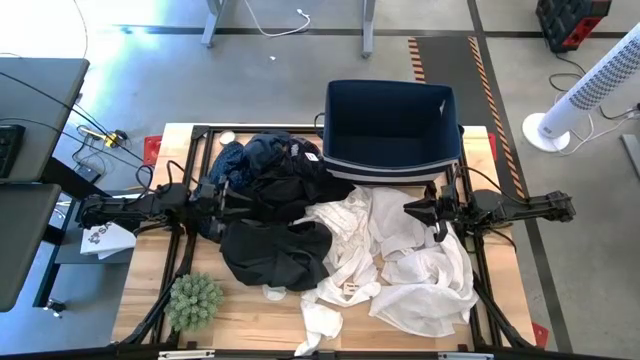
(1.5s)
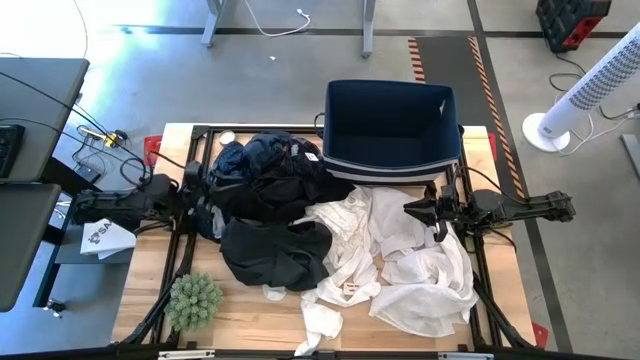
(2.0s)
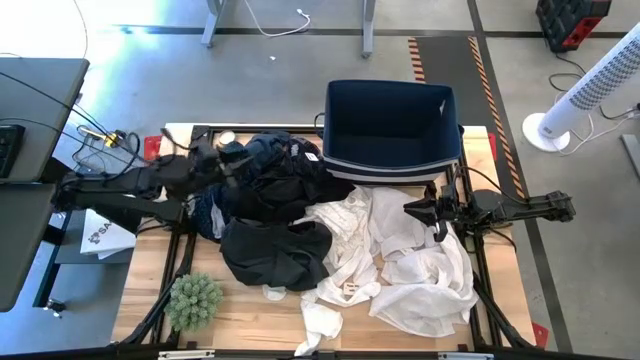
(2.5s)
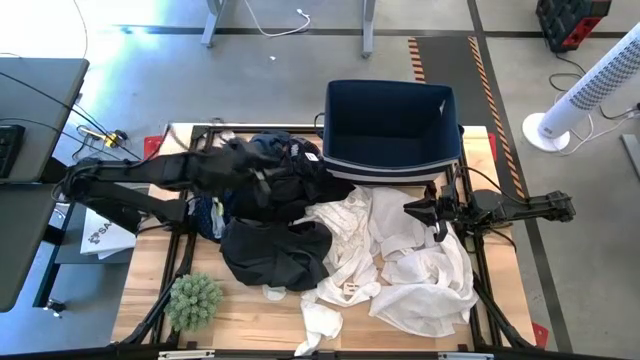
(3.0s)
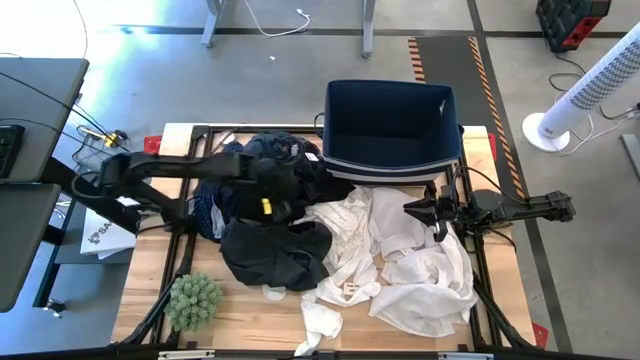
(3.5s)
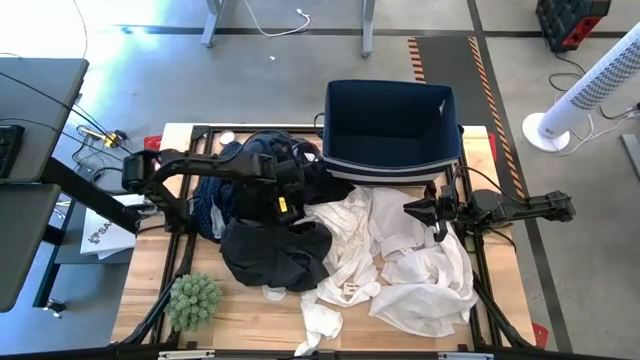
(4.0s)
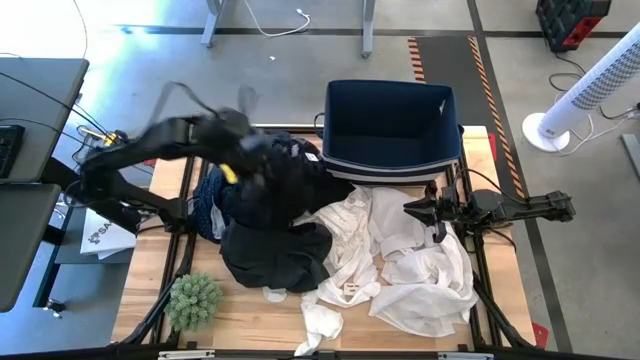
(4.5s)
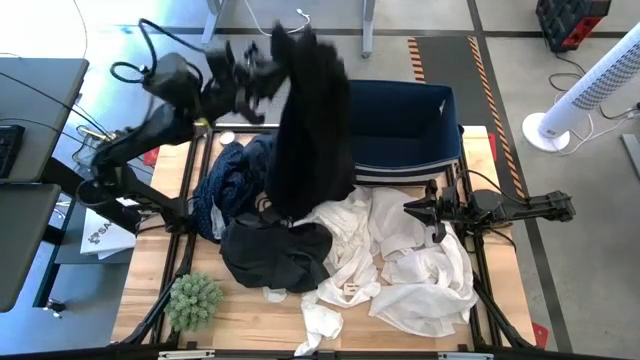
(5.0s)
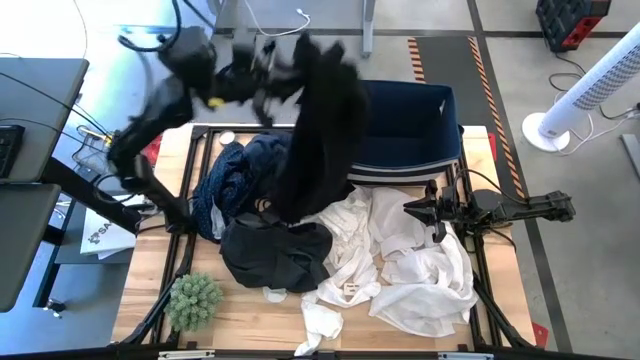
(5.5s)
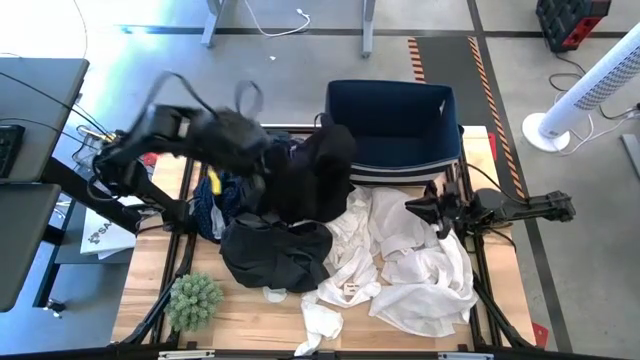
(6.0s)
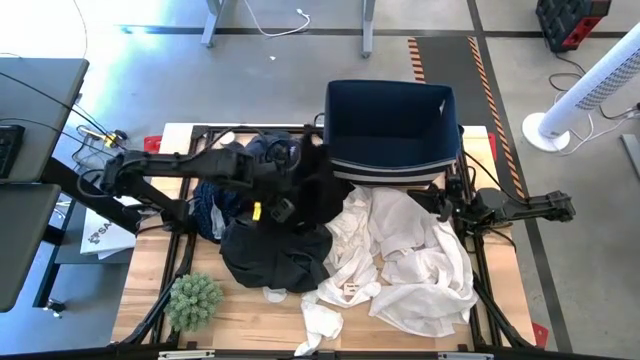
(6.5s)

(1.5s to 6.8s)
Task: Sort clothes
Put the black shirt into the blue laundry organizer

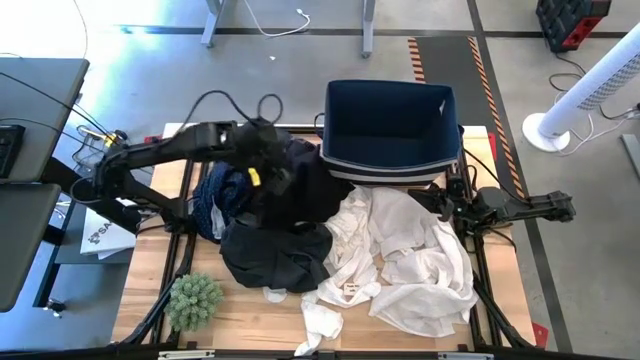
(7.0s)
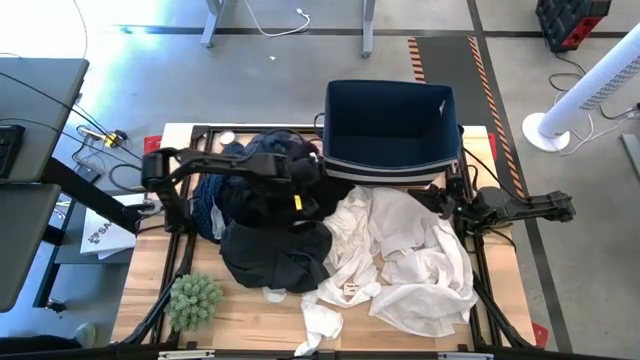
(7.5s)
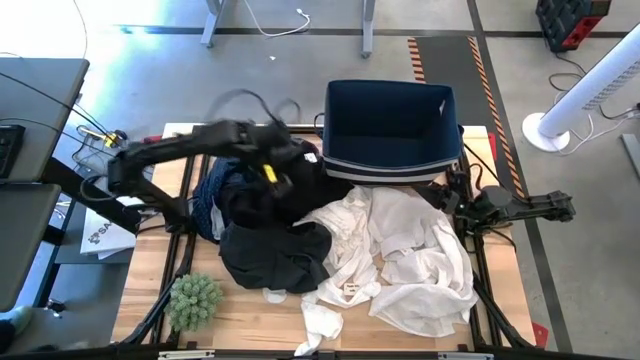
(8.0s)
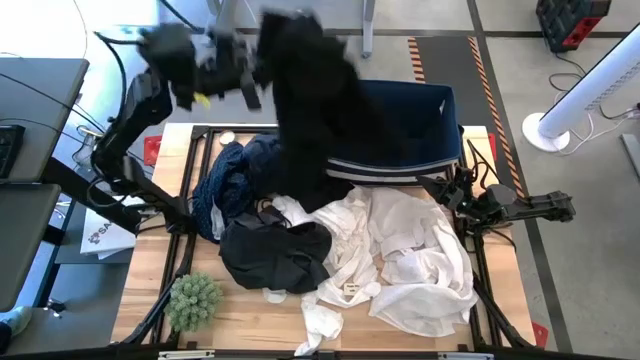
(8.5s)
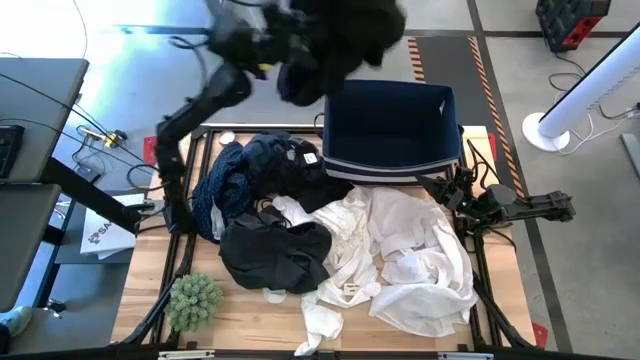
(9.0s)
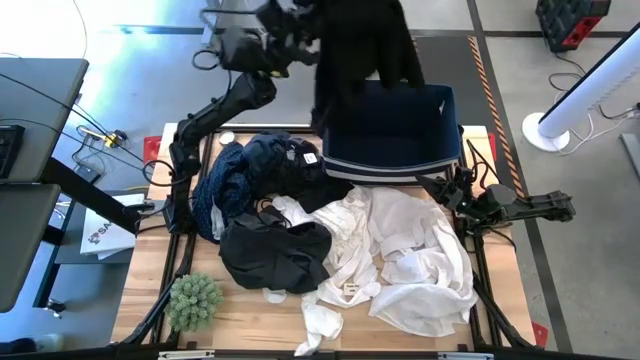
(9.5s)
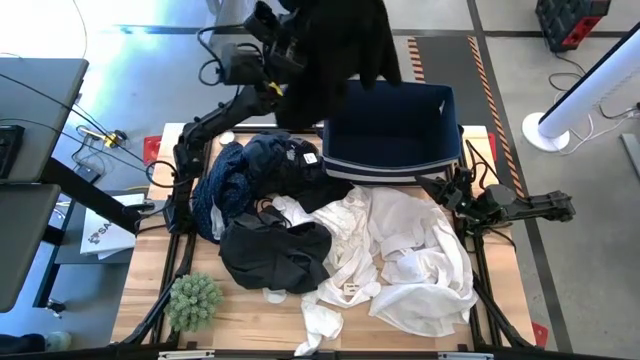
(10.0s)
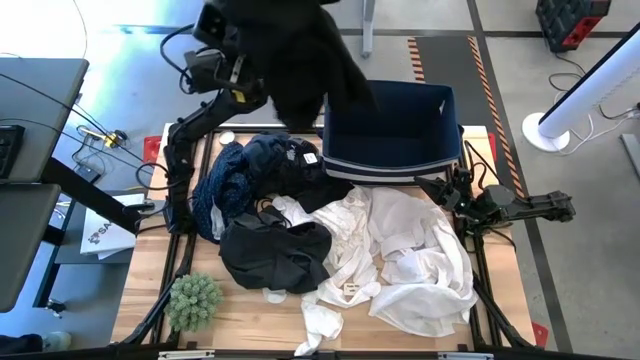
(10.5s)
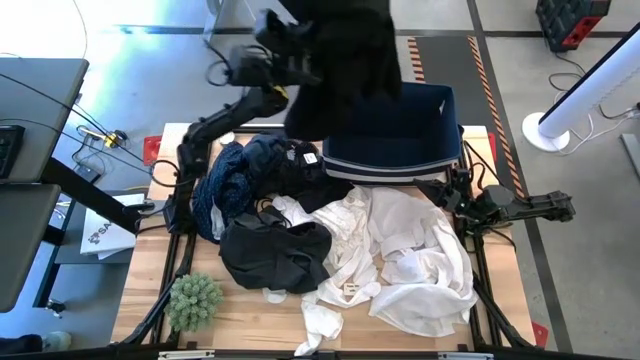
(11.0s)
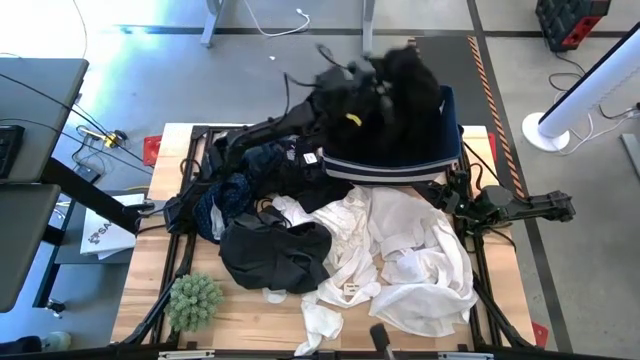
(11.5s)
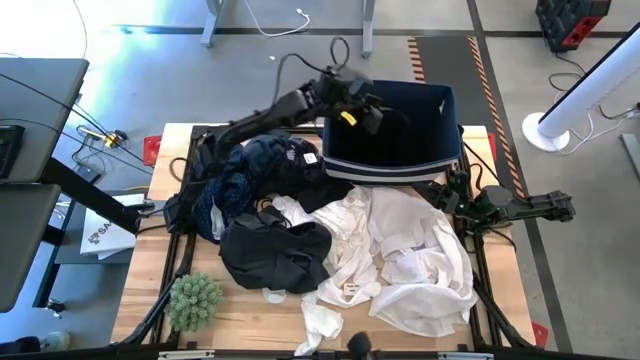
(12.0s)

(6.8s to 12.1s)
Put the black shirt into the blue laundry organizer

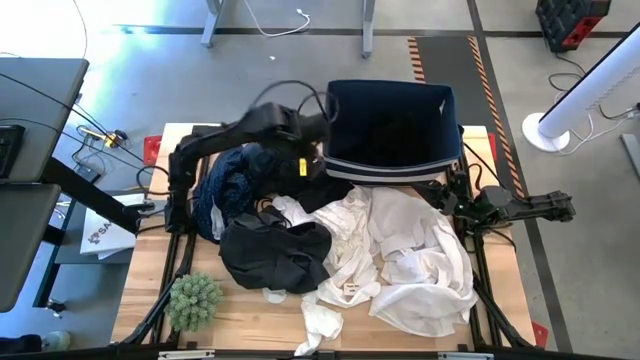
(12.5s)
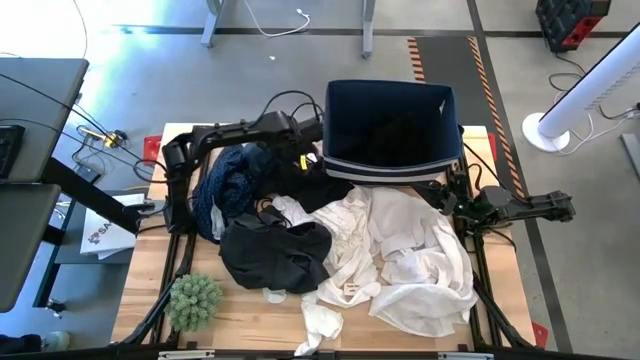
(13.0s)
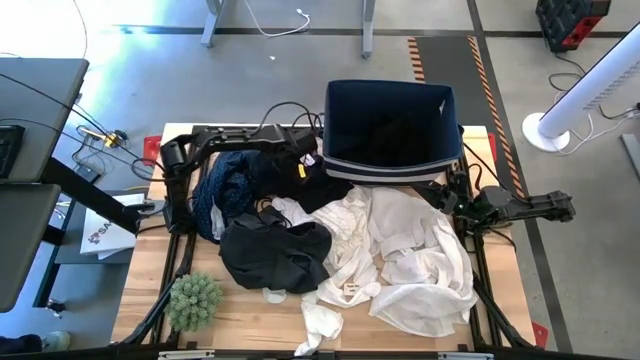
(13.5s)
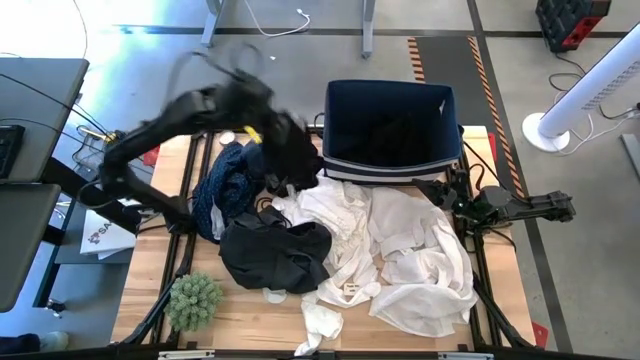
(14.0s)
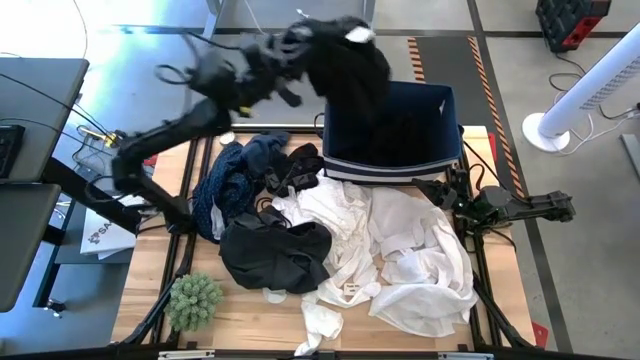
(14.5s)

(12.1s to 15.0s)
Put the black boxer into the blue laundry organizer

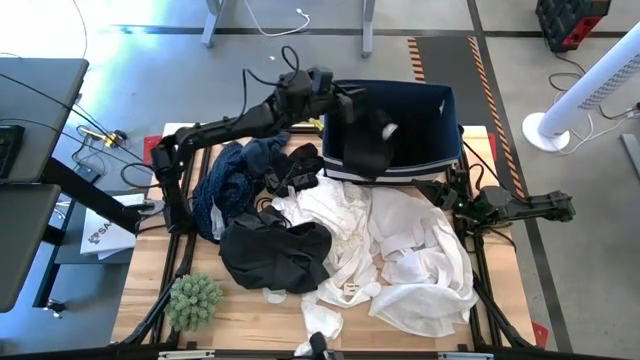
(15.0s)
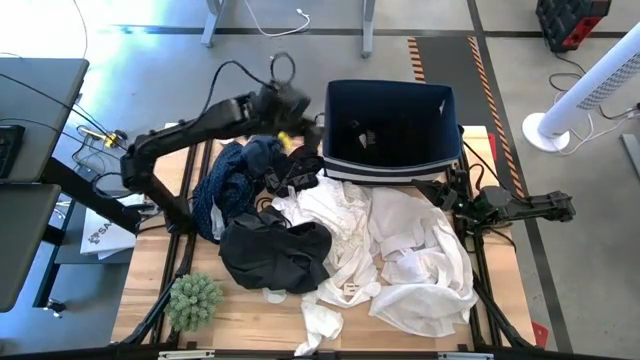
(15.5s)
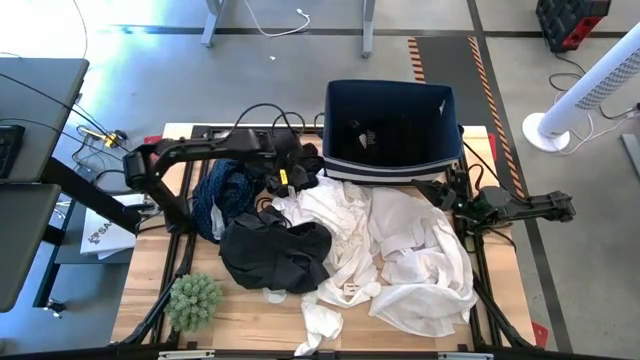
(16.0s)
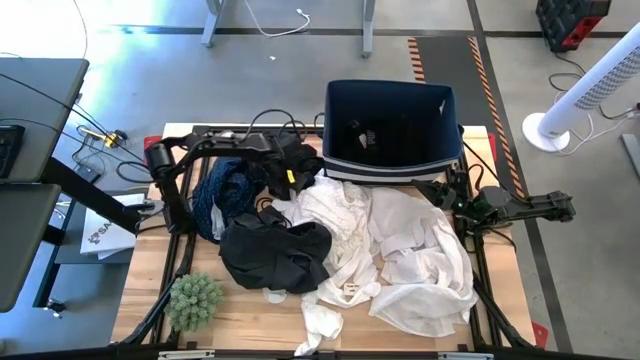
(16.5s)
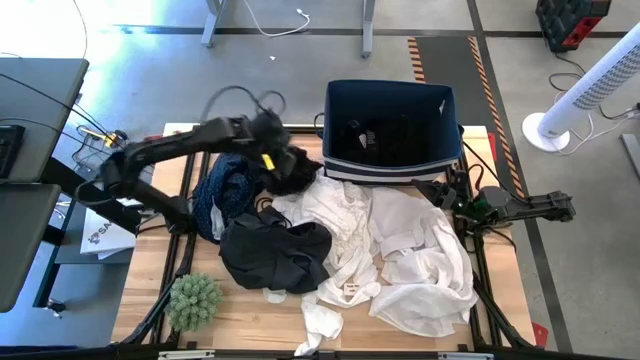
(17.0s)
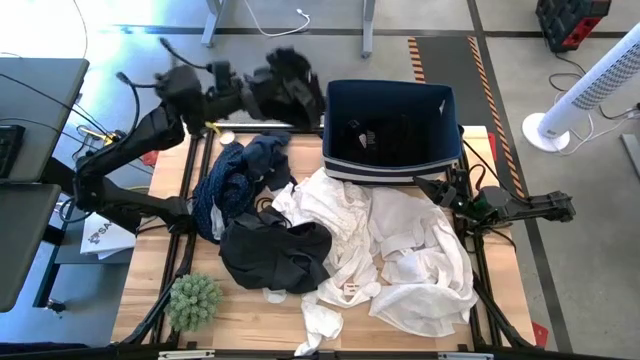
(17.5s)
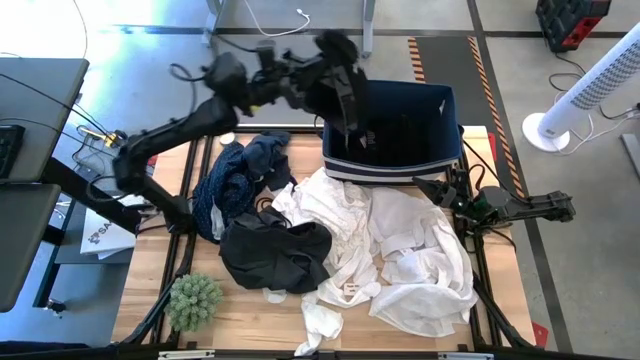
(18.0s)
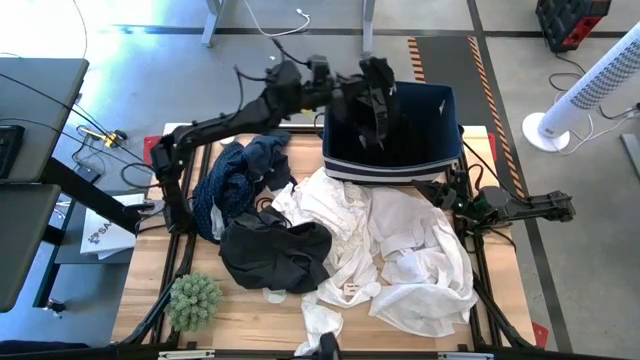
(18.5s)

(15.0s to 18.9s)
Put the black boxer into the blue laundry organizer

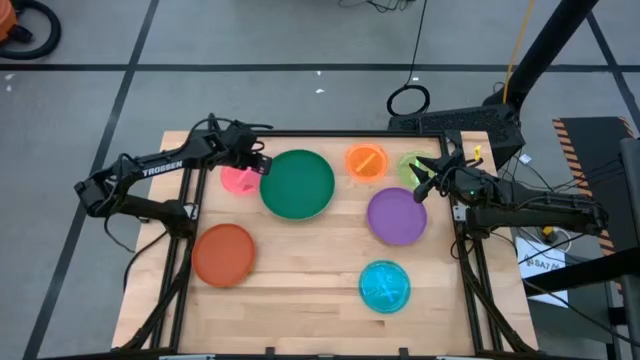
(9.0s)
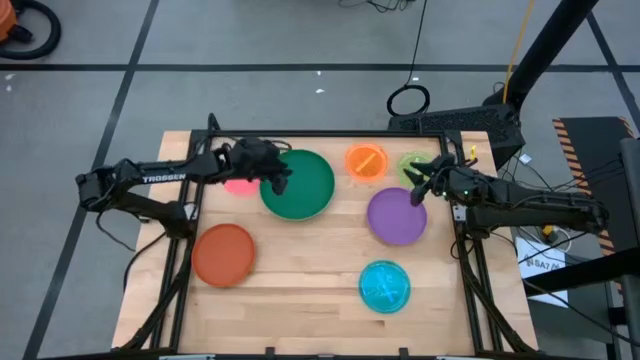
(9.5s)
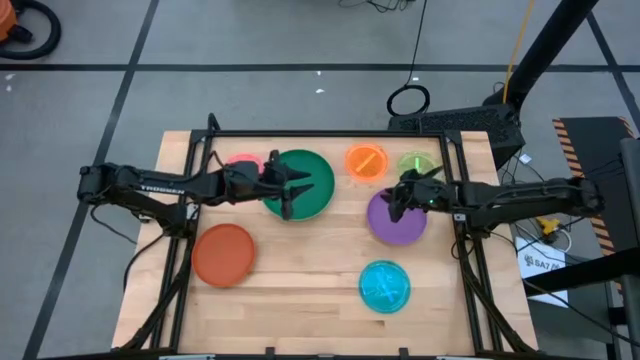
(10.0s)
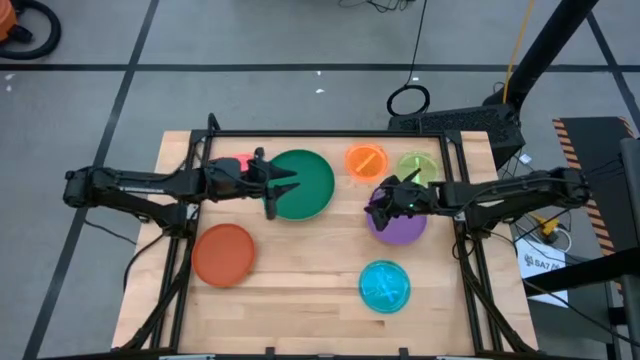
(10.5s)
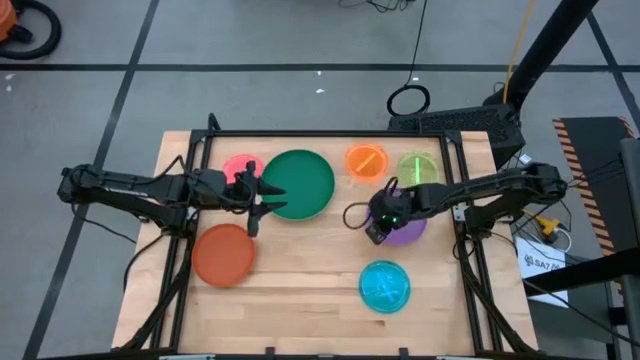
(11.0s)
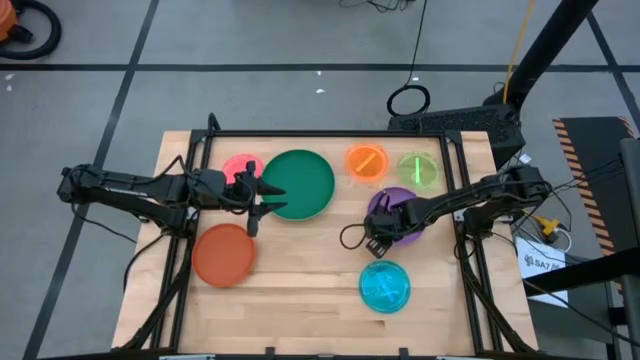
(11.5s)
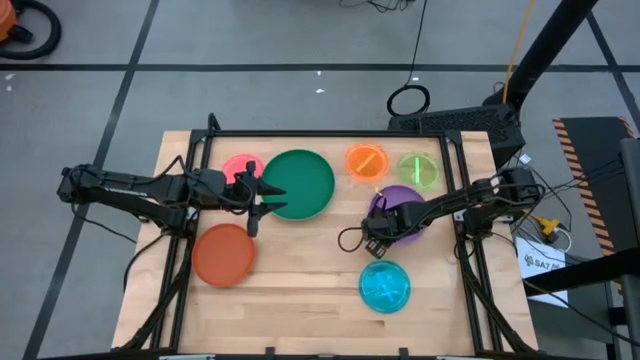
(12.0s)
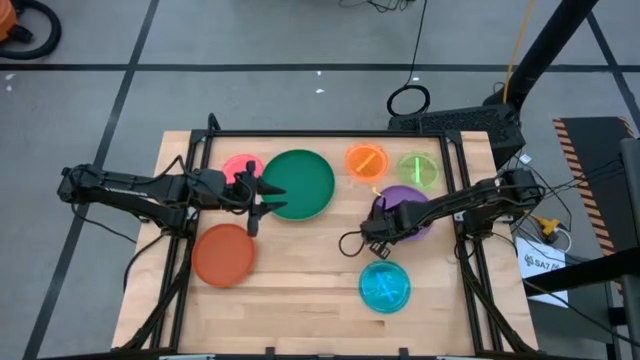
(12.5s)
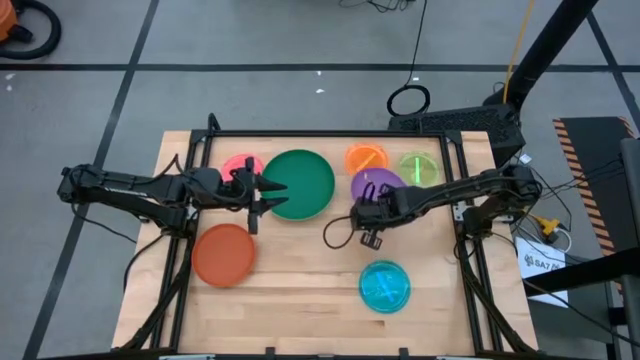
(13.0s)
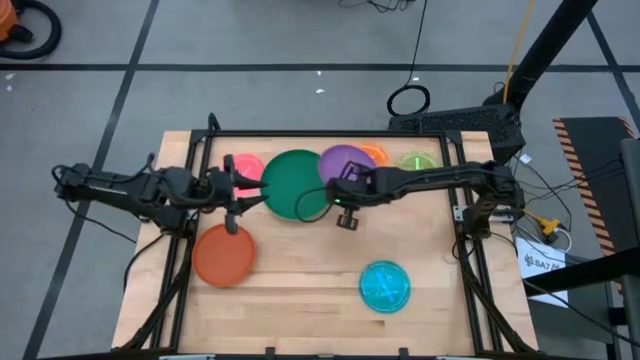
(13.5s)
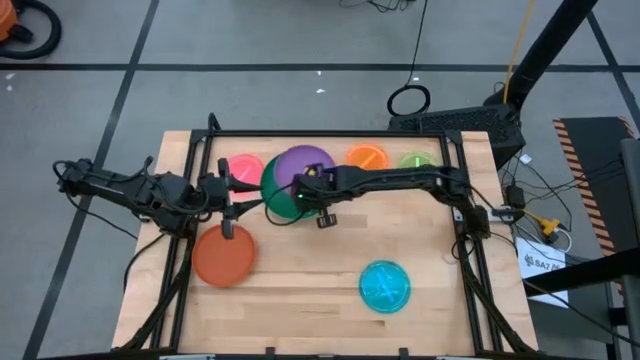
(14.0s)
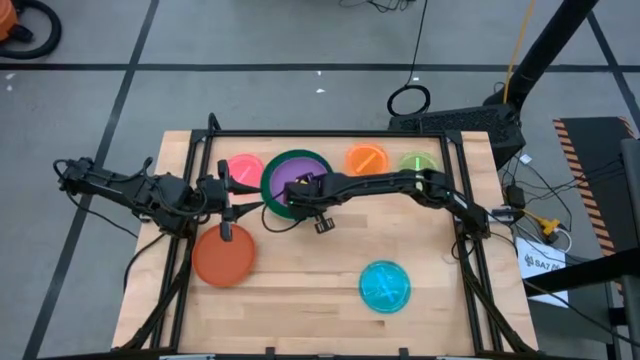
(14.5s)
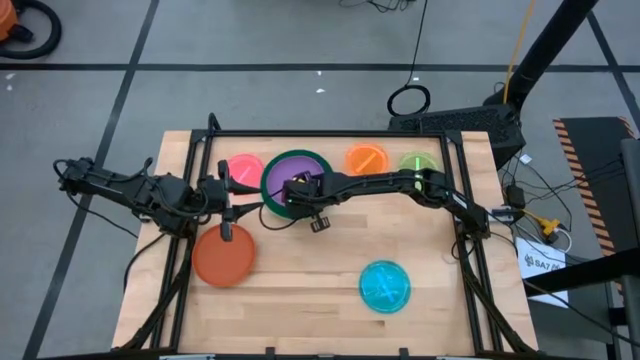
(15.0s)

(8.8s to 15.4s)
Task: Stack plastic plates
Stack the purple plate on top of the dark green plate
